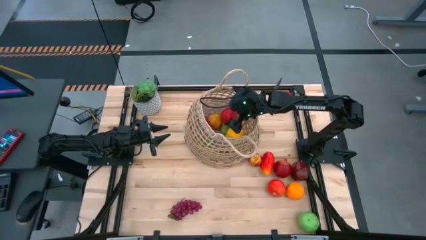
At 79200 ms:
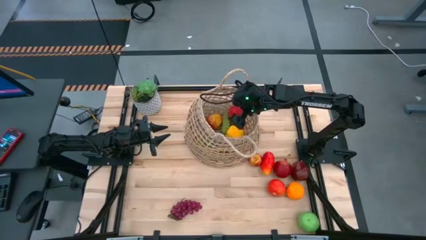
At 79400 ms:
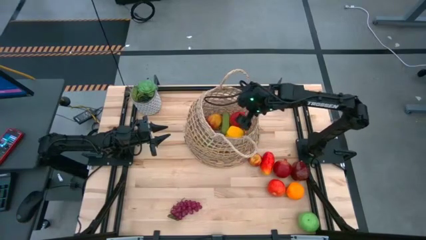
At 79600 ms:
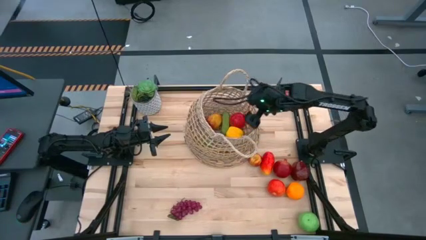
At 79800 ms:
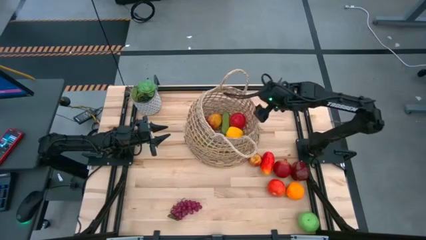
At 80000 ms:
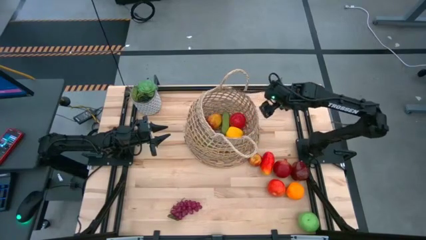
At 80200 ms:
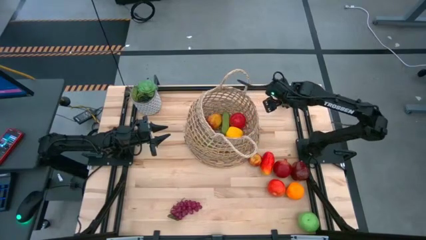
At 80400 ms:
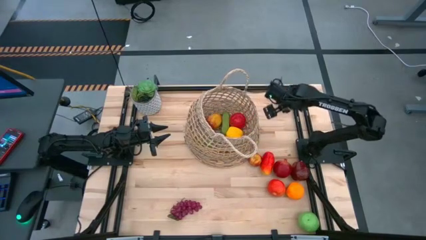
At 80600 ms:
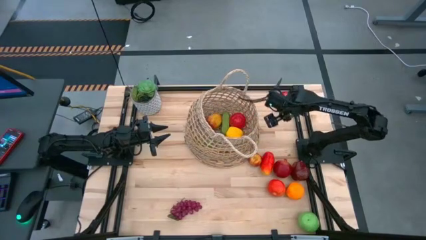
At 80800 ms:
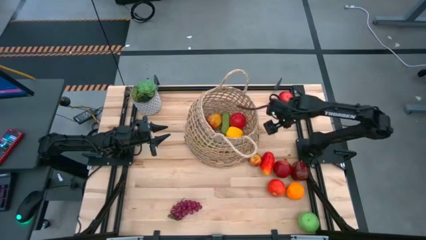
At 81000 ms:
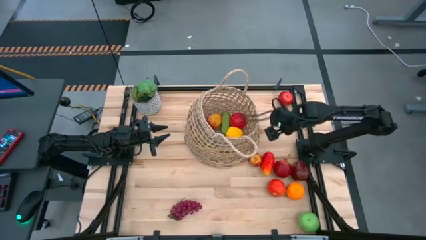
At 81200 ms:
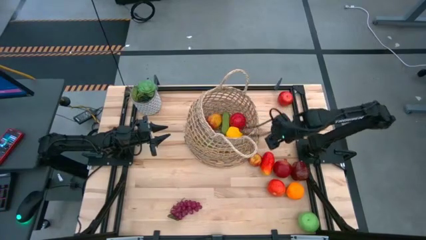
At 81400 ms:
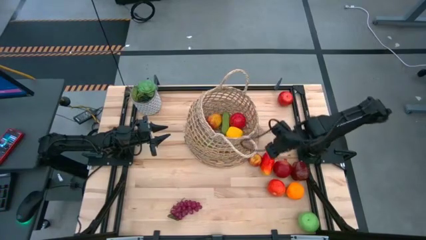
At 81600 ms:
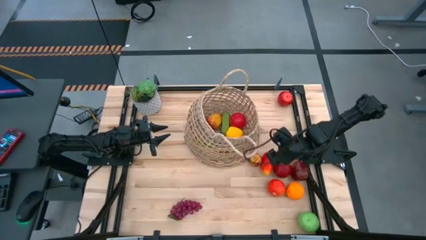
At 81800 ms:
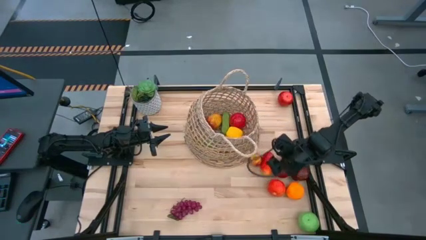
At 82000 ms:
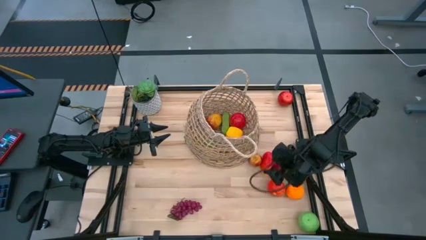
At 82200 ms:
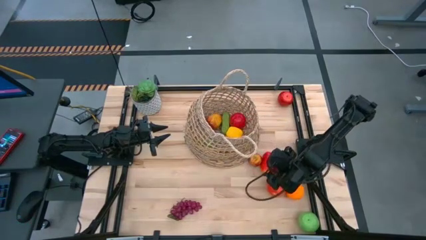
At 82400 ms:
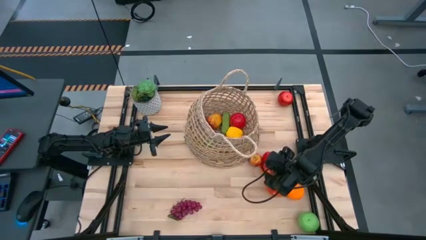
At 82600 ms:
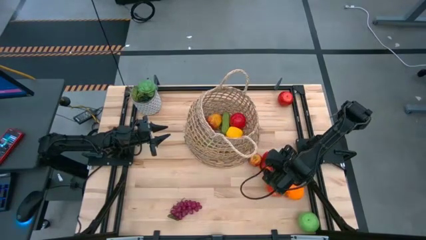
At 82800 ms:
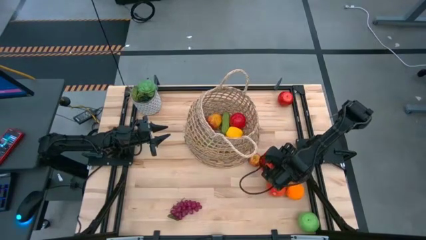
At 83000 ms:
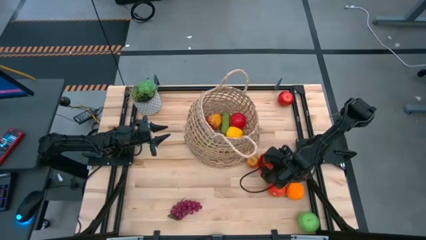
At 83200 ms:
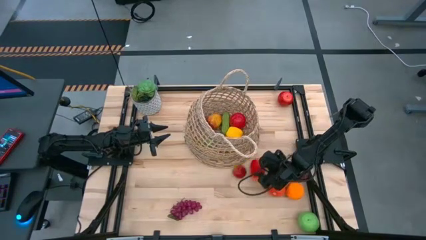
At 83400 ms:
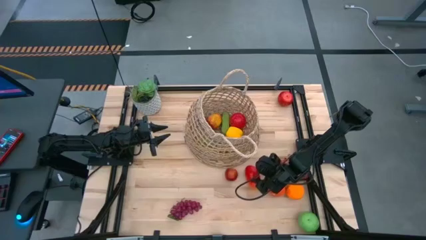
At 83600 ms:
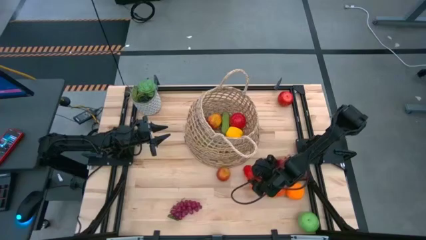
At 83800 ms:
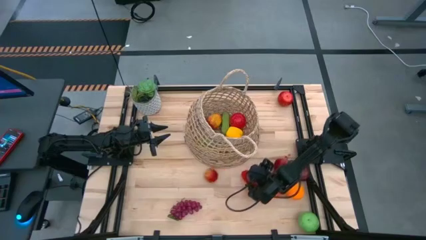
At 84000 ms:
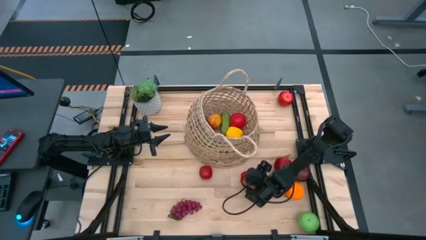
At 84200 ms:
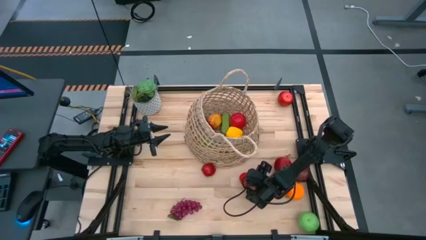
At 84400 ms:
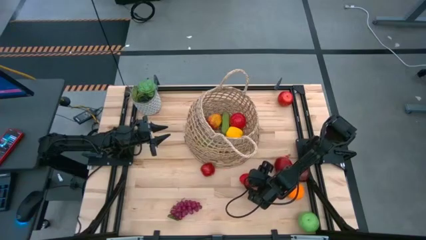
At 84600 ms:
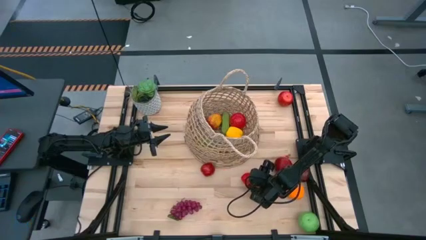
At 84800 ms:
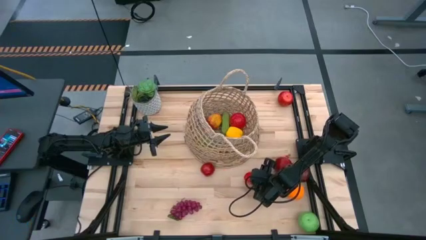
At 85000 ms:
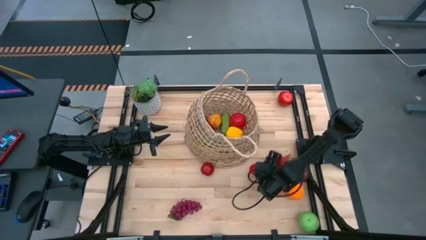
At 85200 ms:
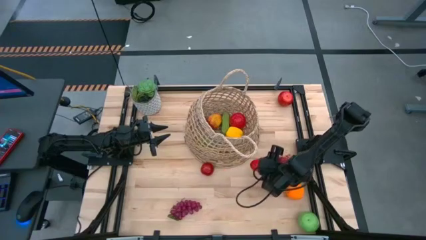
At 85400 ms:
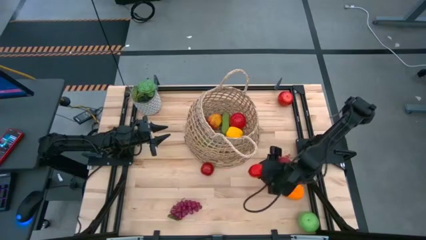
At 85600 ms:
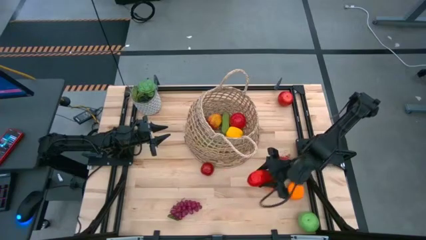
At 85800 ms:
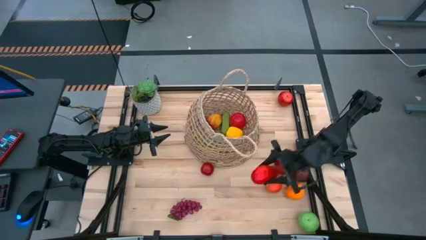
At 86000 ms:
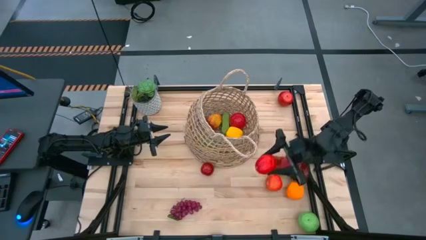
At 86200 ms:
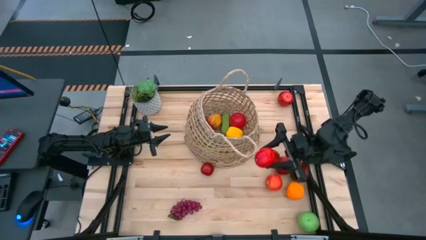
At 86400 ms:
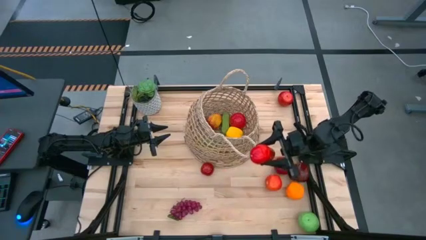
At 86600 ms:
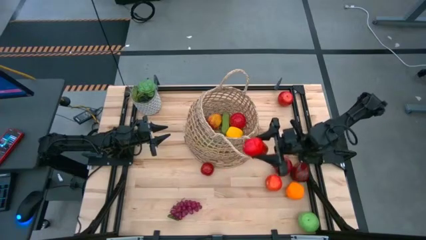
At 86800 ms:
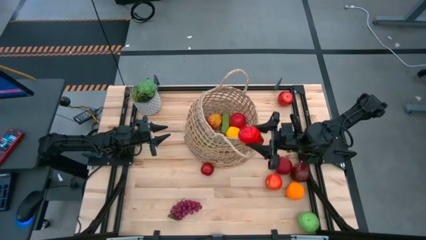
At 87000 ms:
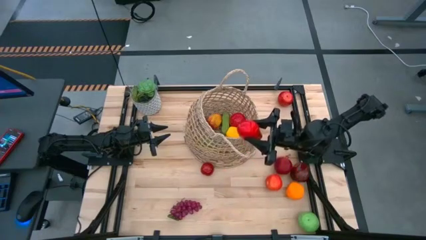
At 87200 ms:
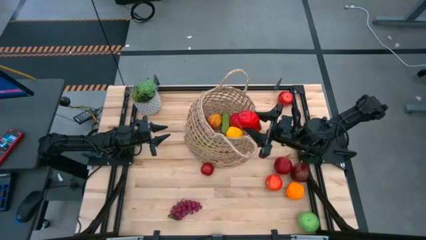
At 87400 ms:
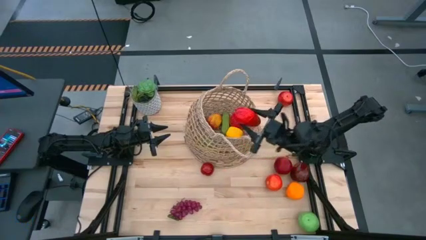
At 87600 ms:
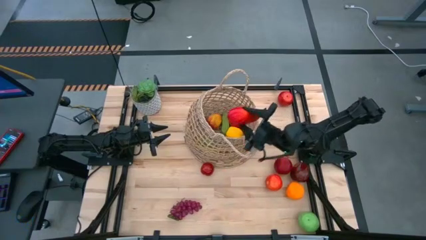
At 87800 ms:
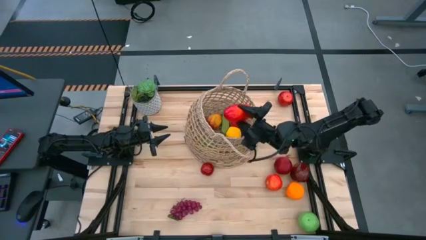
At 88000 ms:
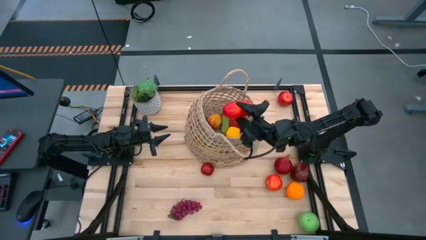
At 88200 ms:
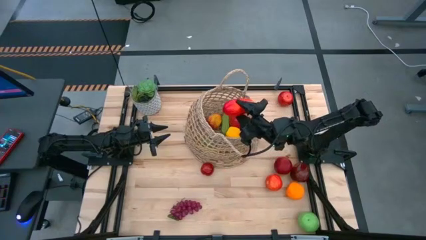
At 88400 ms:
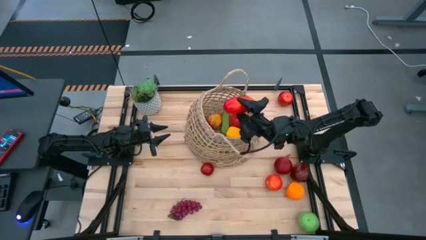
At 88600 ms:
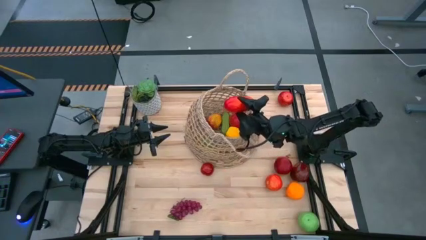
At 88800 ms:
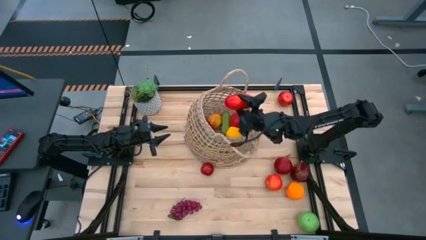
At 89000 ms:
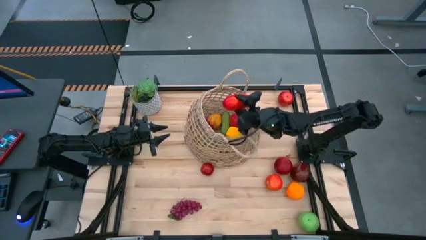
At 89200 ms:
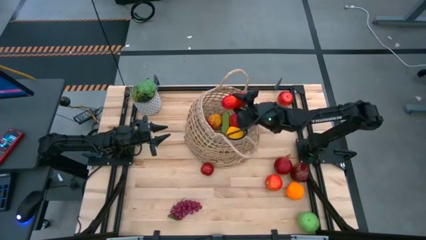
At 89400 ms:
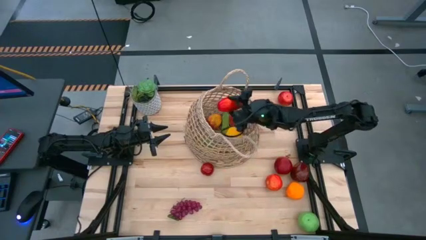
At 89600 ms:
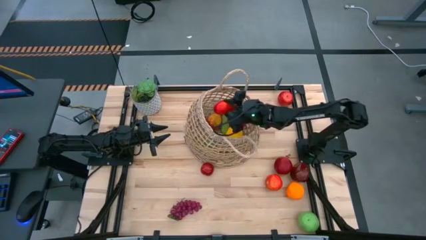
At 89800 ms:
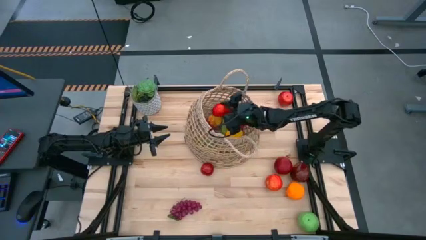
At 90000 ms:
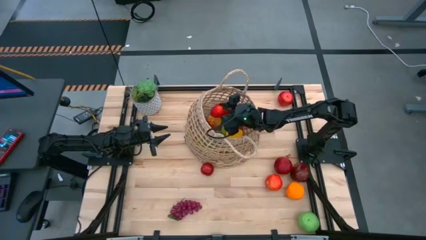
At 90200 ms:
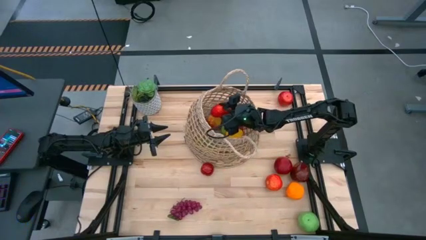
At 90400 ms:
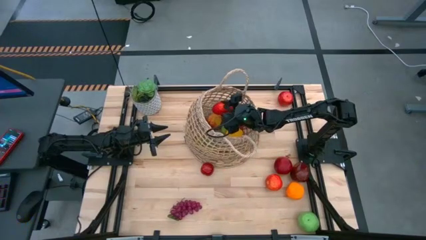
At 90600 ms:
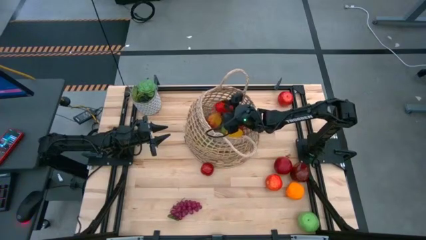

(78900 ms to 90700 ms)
Task: Build produce basket
Put the red mango into the brown basket
